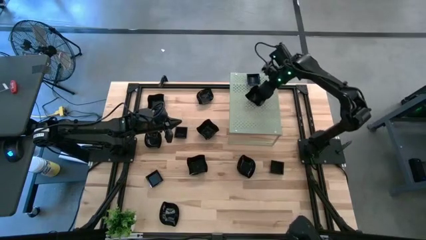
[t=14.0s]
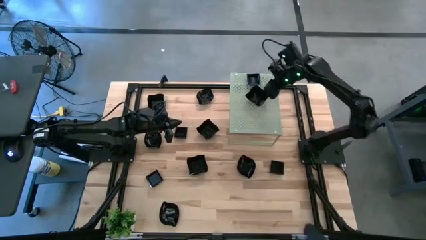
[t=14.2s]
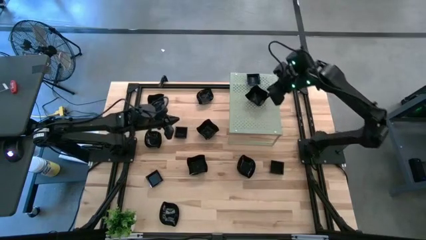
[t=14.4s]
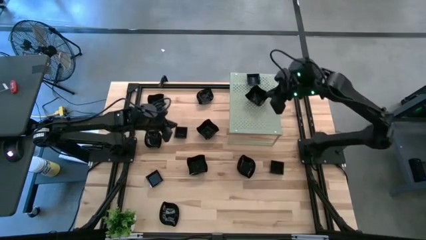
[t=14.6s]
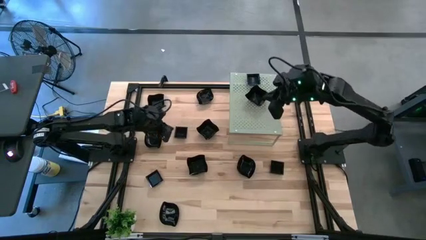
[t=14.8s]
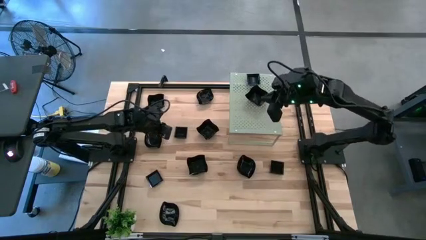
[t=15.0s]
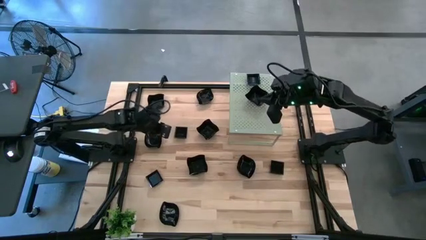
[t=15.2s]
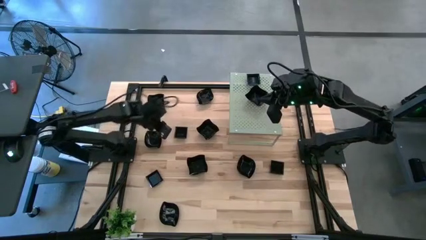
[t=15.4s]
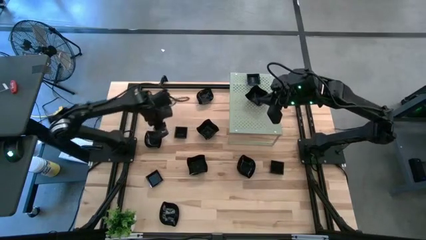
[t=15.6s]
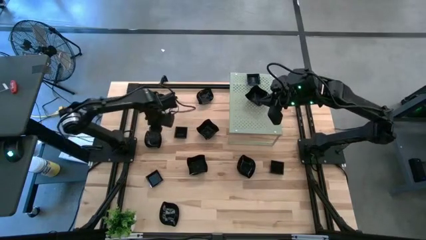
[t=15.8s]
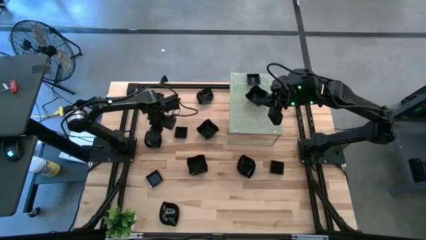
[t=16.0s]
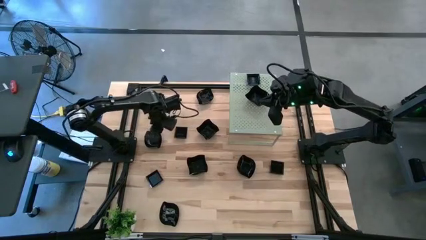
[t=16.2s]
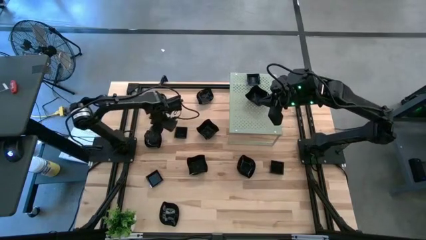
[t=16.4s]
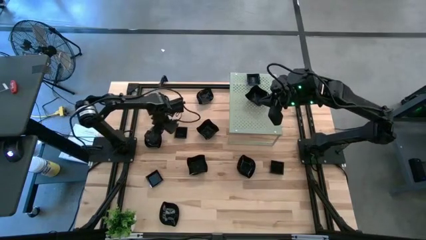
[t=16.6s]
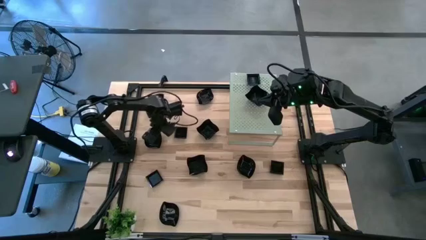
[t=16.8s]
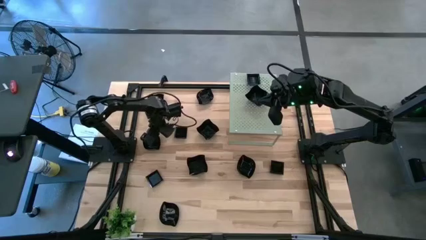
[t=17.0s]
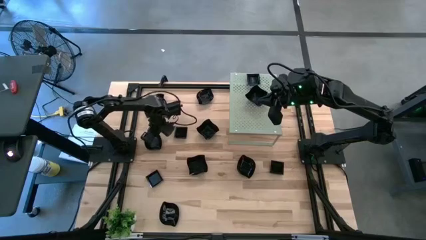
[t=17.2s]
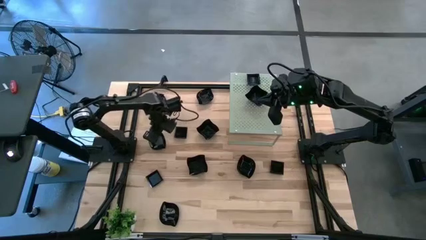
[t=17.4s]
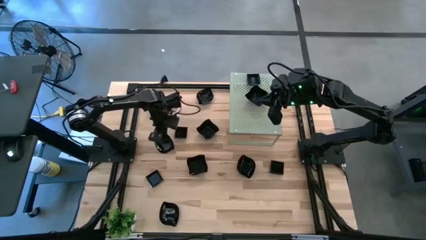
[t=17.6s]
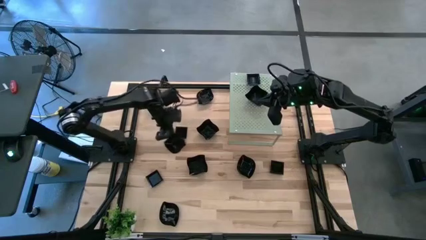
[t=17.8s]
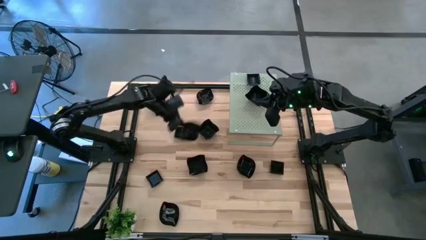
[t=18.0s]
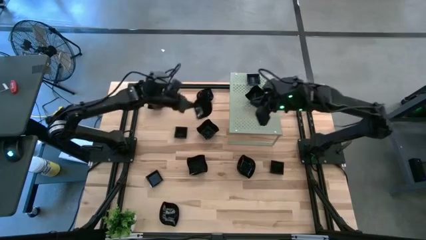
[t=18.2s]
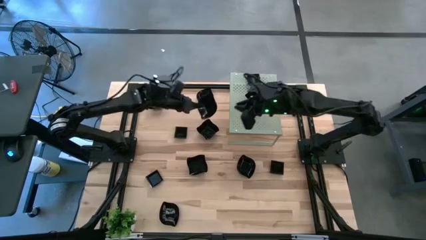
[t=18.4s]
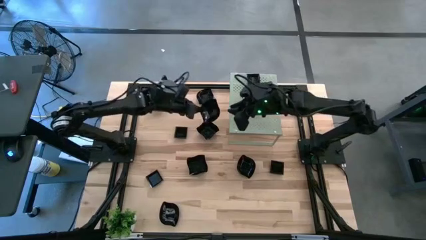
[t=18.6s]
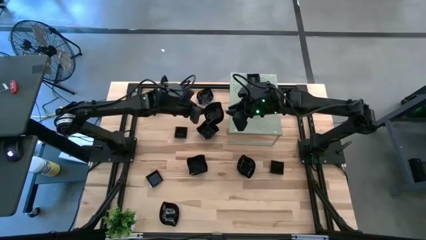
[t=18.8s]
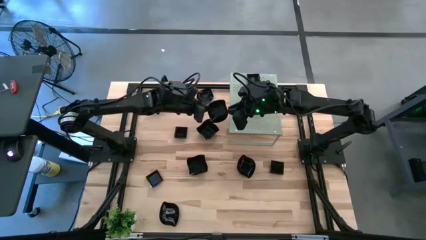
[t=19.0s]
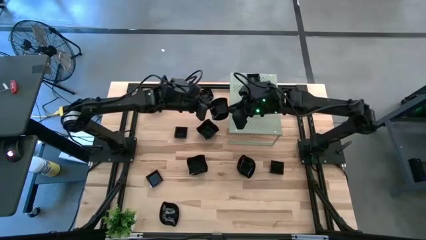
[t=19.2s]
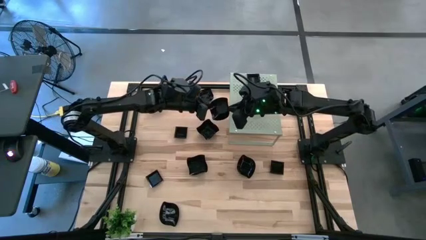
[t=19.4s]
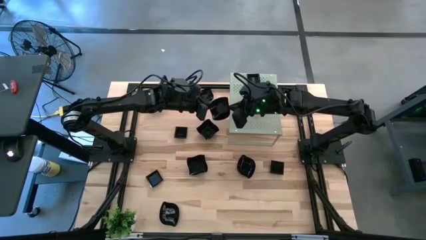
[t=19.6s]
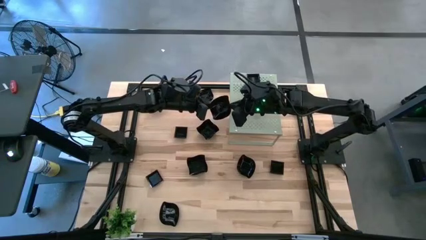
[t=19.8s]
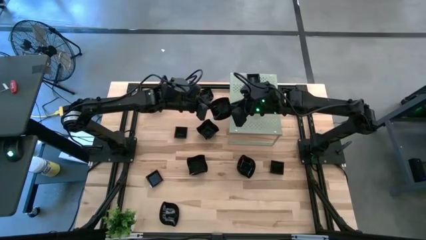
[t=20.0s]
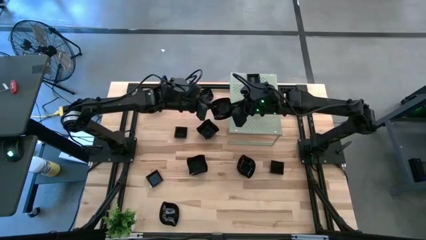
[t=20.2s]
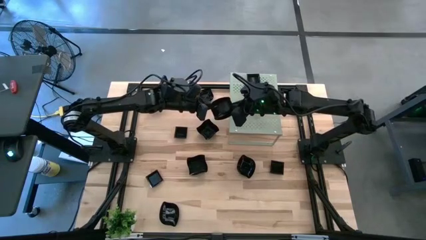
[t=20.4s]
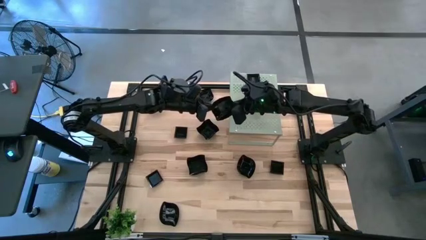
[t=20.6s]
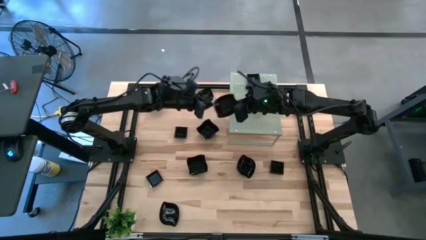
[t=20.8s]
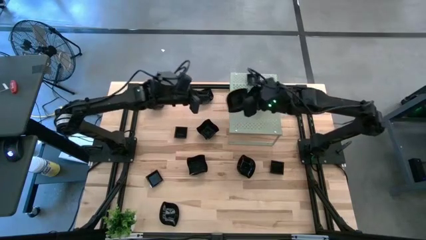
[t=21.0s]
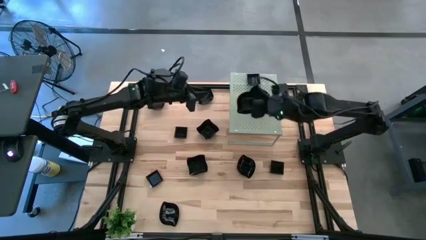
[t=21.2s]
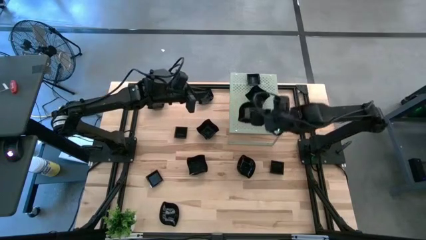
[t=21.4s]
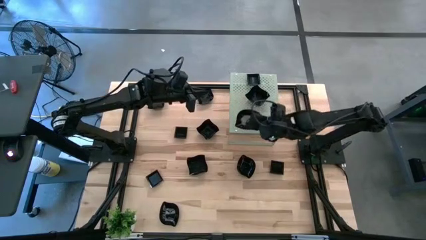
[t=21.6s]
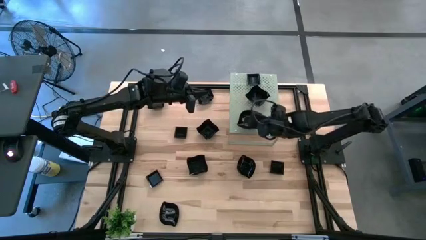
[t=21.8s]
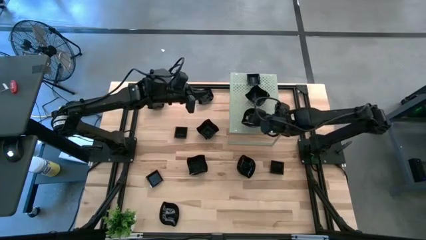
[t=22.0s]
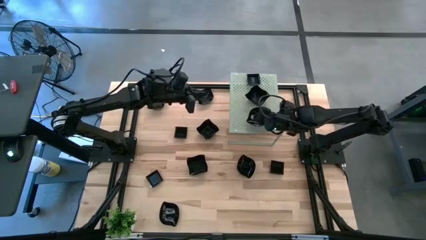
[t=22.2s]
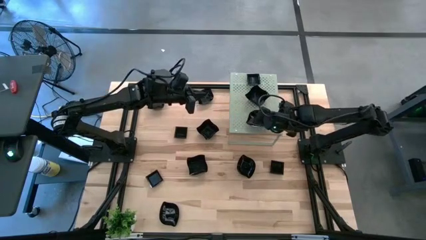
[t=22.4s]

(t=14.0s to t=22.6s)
Task: Pick & Place Mini shaped plates
Put the black leaf-shaped plate on the shelf

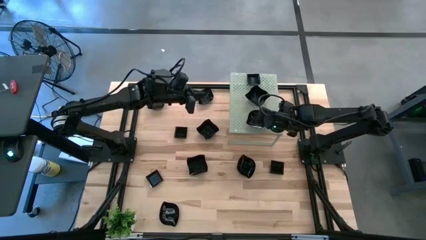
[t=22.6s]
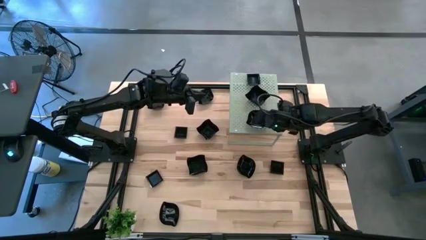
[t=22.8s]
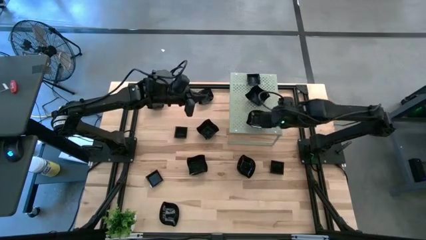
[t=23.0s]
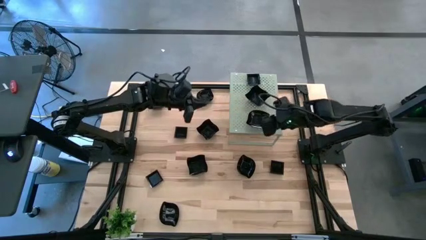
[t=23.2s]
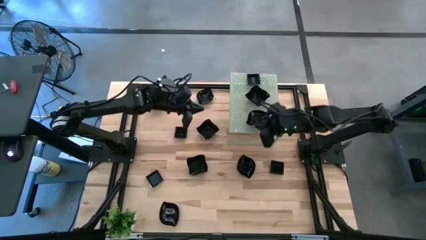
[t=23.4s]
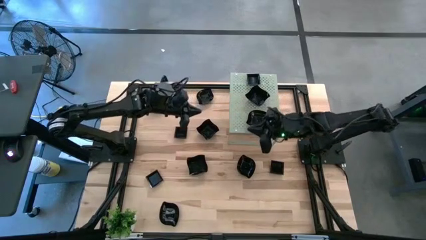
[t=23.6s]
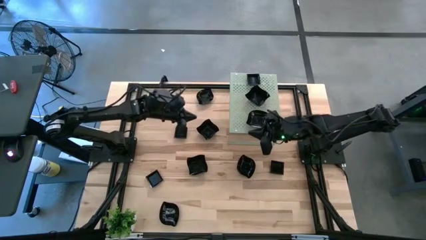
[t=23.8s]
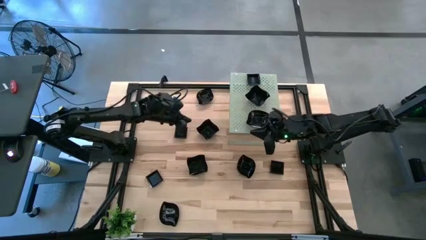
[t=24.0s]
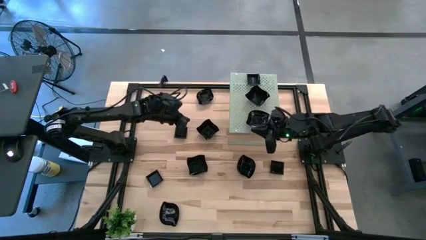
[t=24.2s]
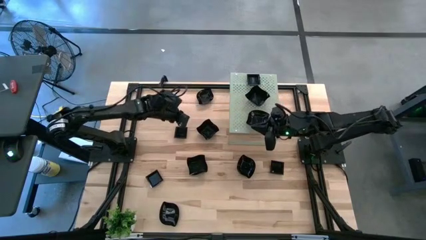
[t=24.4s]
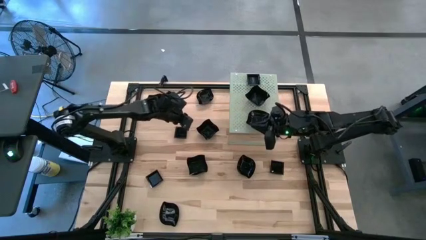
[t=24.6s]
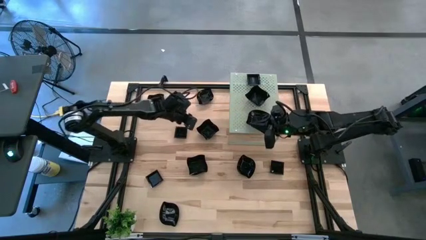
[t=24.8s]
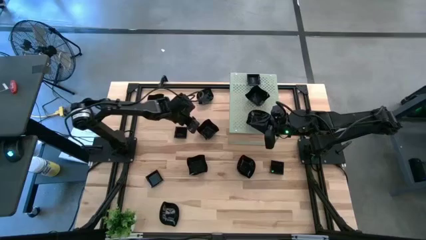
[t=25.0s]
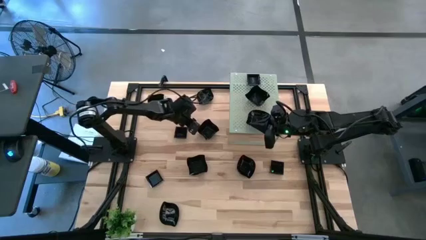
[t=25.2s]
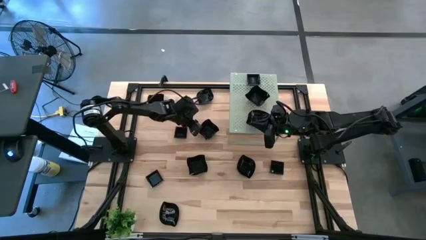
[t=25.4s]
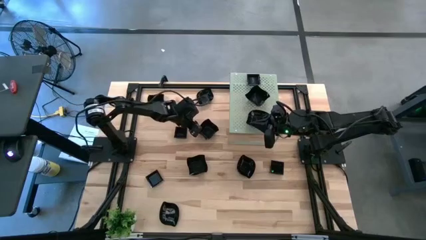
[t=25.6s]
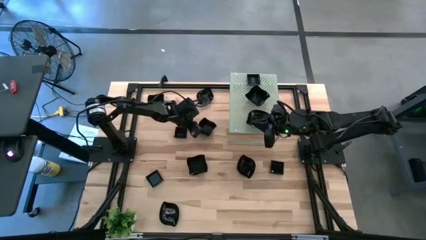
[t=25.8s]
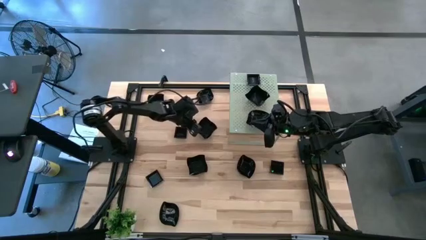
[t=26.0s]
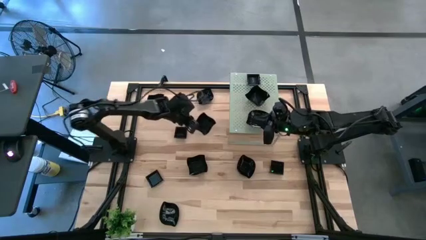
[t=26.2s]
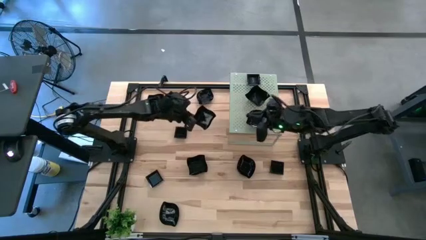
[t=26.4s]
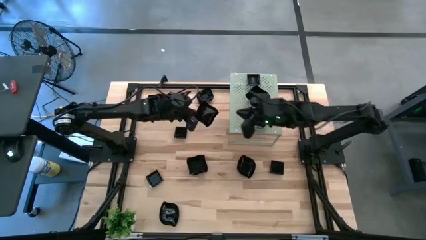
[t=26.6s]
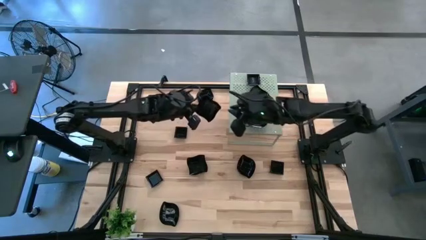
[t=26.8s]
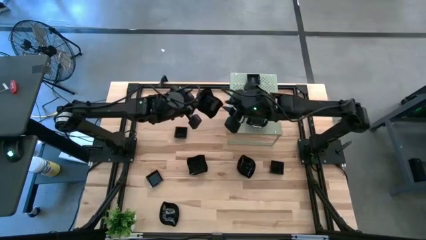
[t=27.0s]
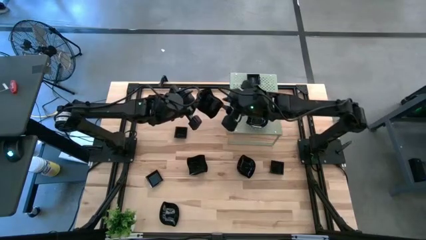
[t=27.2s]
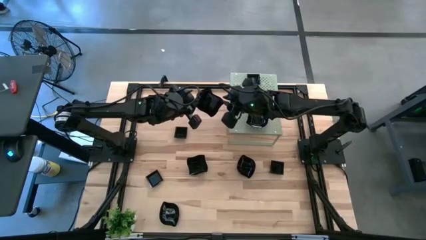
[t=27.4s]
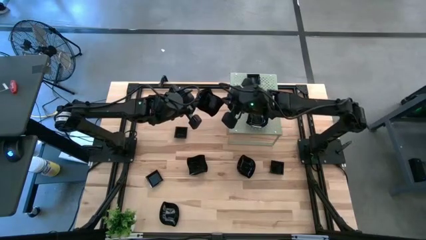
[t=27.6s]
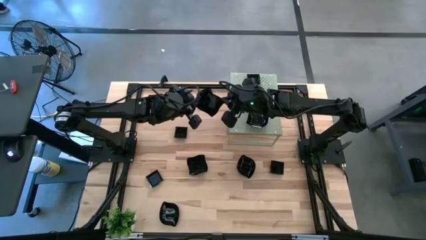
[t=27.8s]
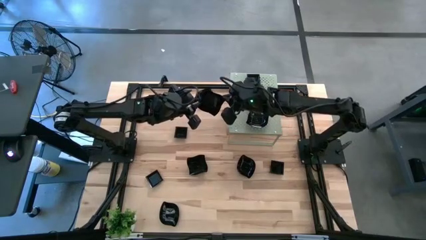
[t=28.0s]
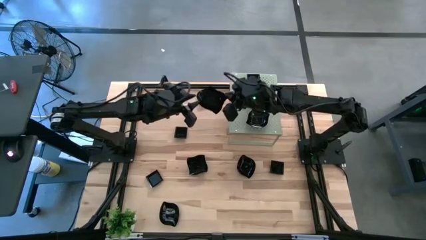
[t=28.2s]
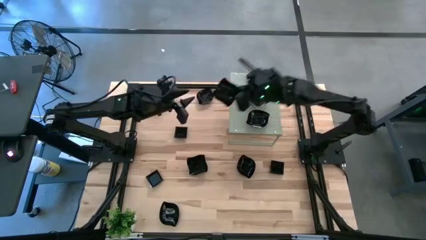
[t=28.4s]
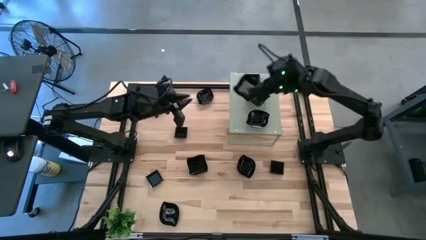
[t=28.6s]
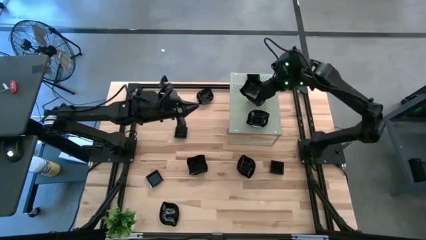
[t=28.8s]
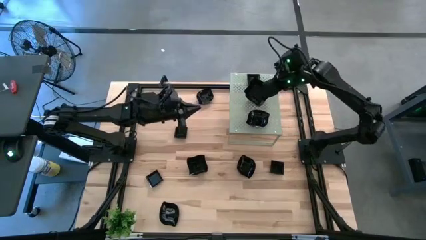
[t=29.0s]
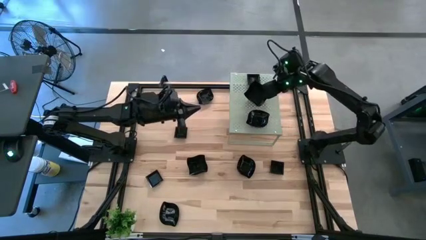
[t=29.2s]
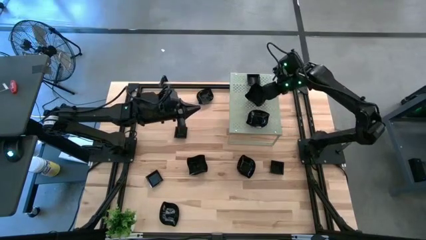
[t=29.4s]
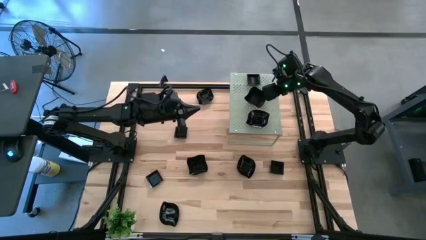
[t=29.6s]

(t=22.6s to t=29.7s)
Stack the black distorted square plate on the black distorted square plate on the shelf

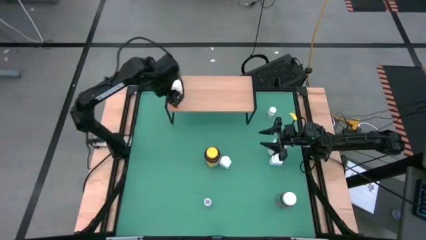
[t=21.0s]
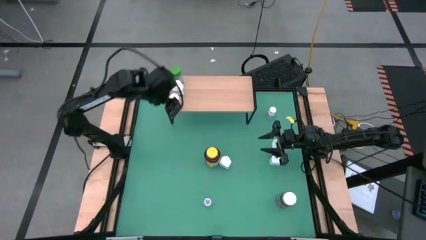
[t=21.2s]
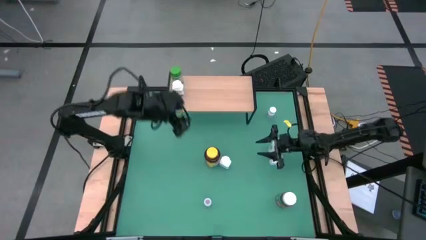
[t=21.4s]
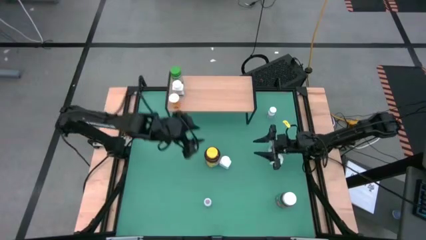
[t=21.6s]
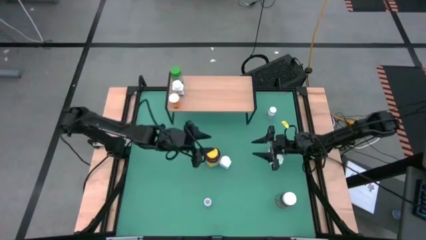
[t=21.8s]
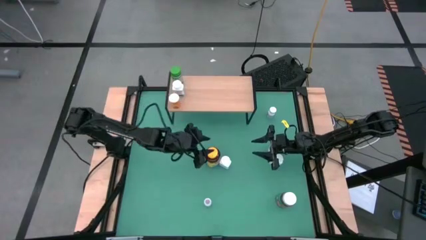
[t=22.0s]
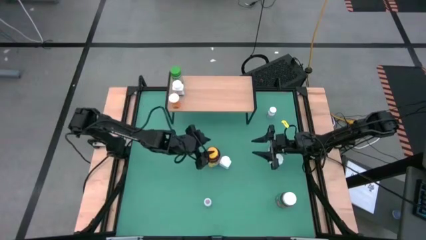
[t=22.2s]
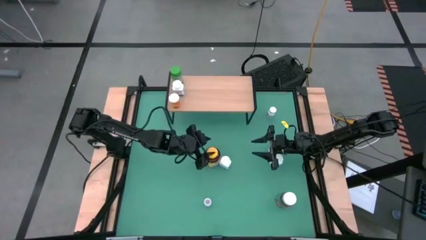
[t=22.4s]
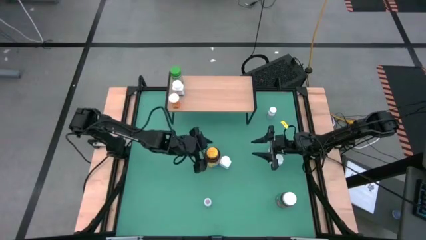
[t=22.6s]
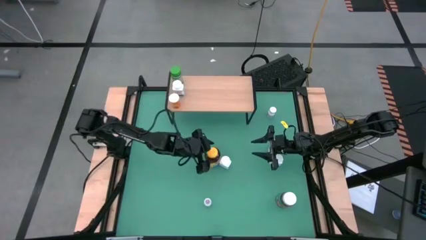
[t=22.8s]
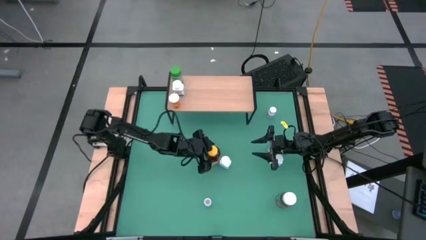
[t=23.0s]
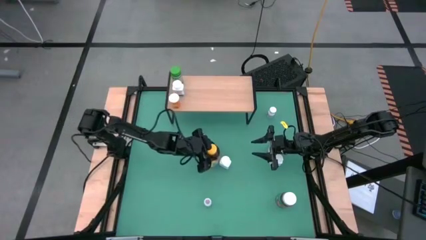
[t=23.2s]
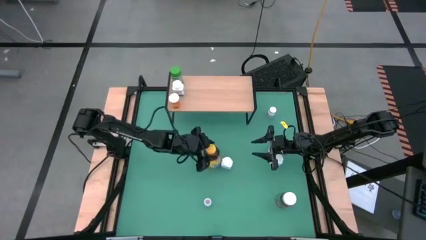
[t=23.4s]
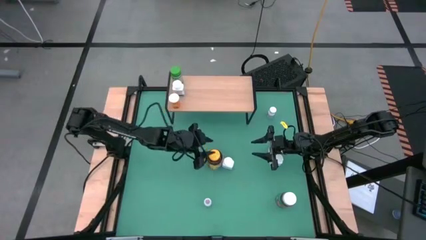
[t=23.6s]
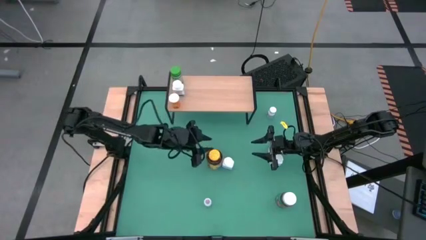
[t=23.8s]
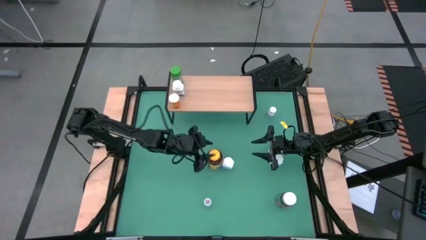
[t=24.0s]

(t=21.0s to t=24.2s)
Task: Pick and place medicine bottles onto shelf by color
Put the yellow pill bottle on the shelf
